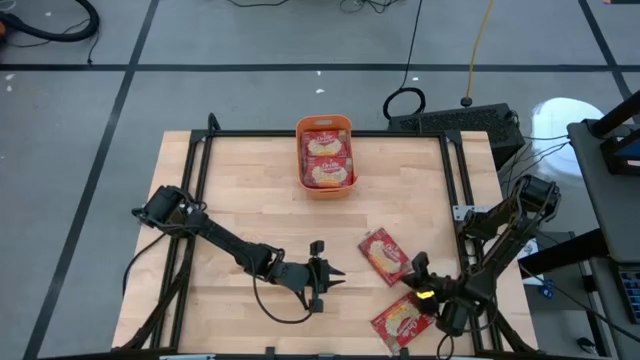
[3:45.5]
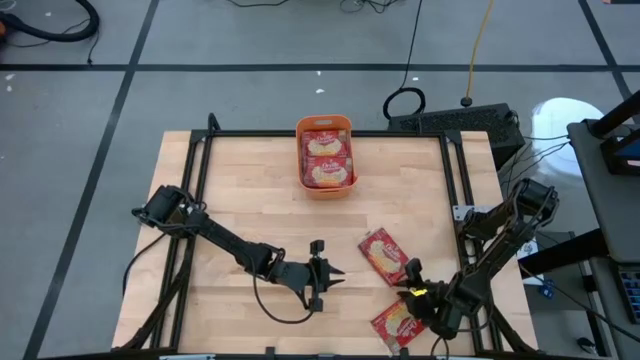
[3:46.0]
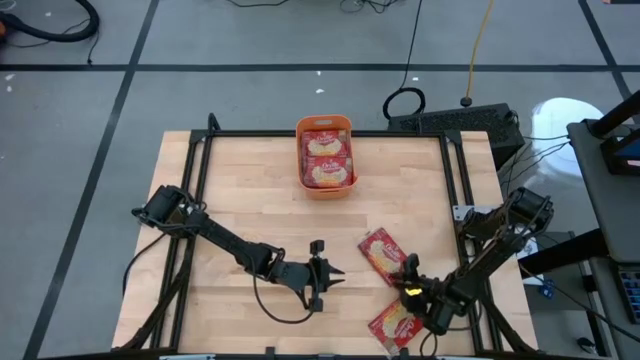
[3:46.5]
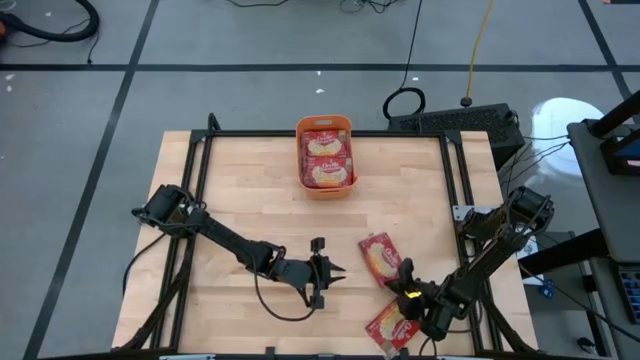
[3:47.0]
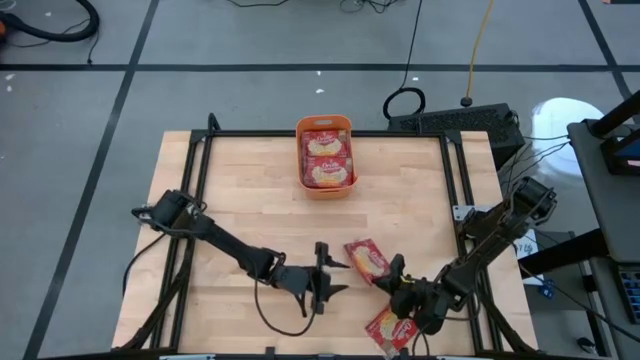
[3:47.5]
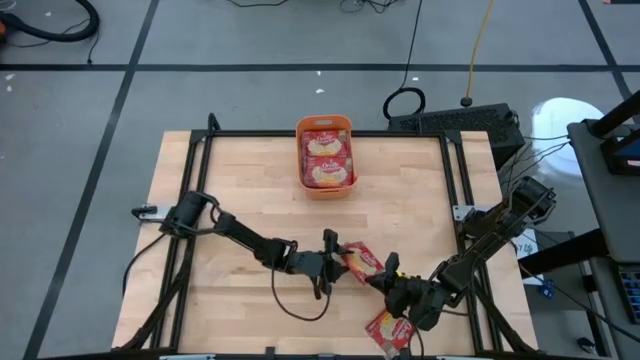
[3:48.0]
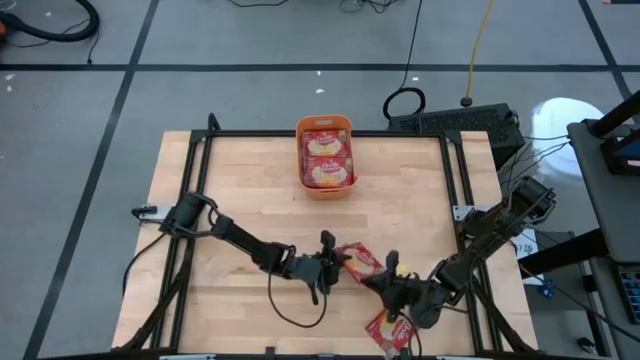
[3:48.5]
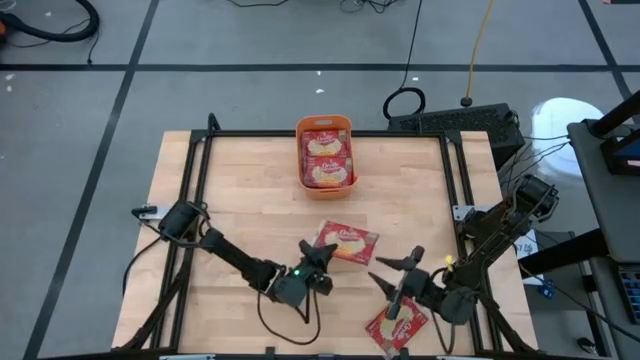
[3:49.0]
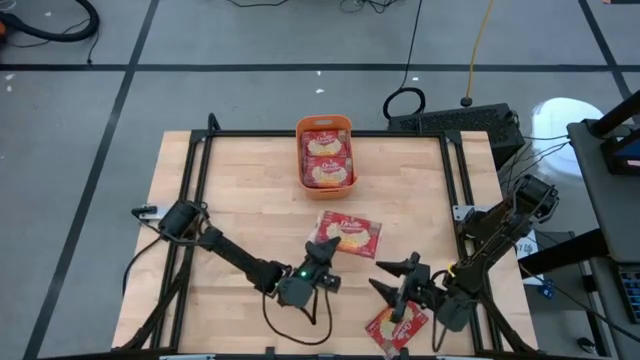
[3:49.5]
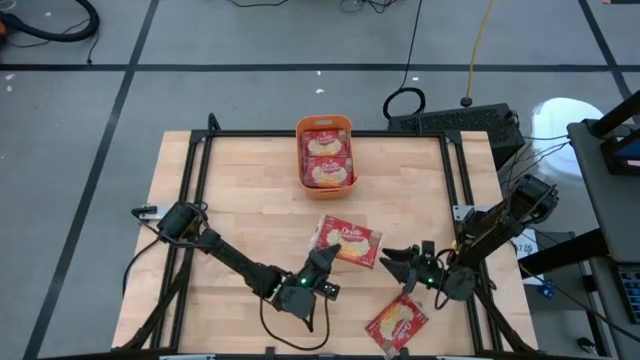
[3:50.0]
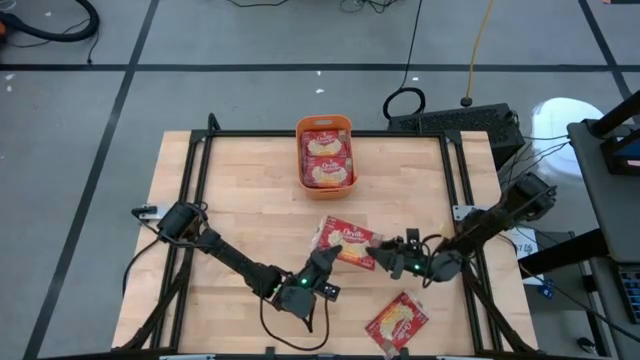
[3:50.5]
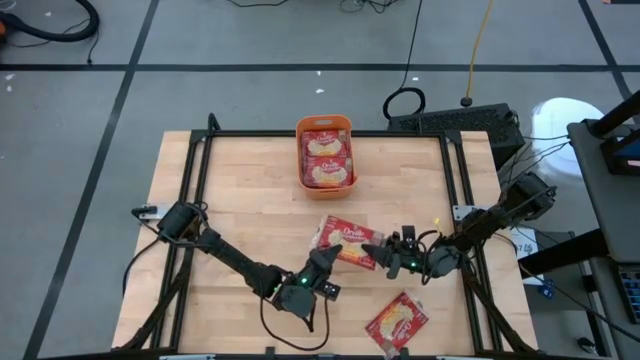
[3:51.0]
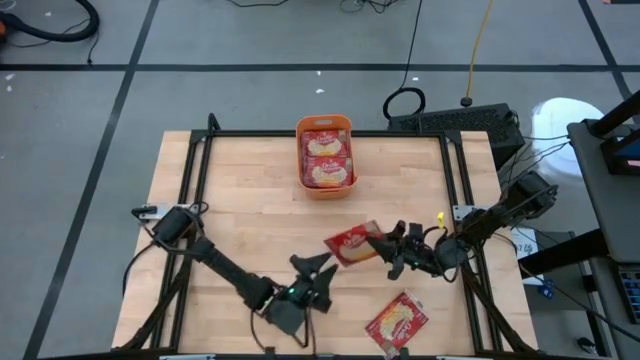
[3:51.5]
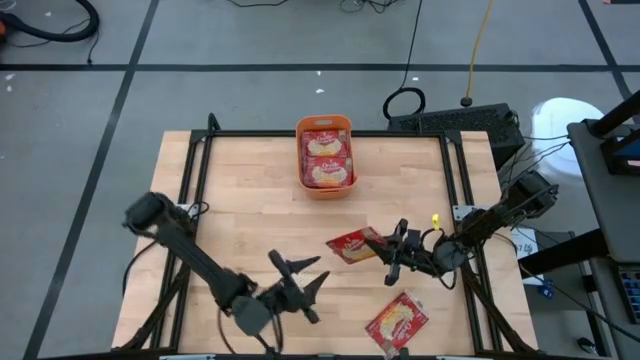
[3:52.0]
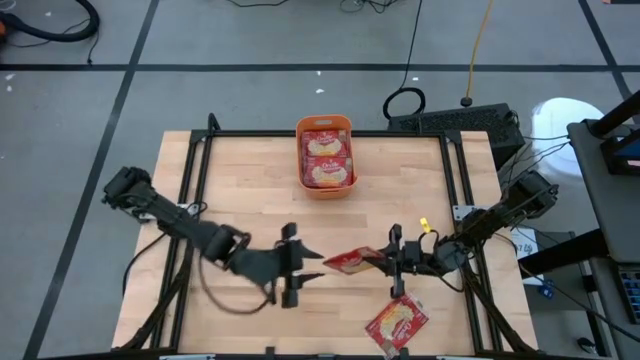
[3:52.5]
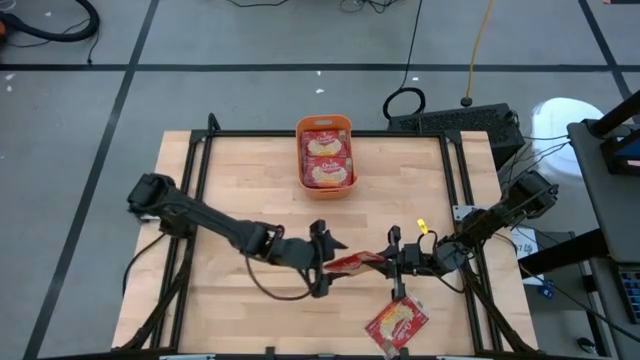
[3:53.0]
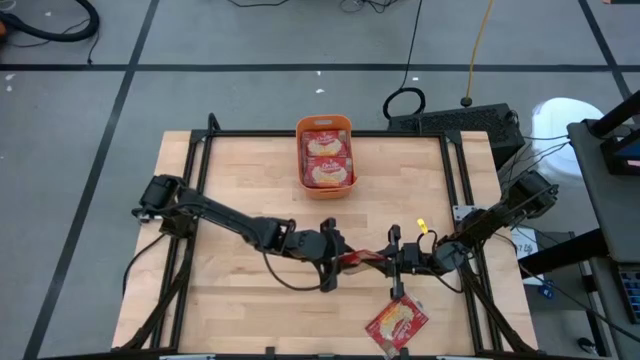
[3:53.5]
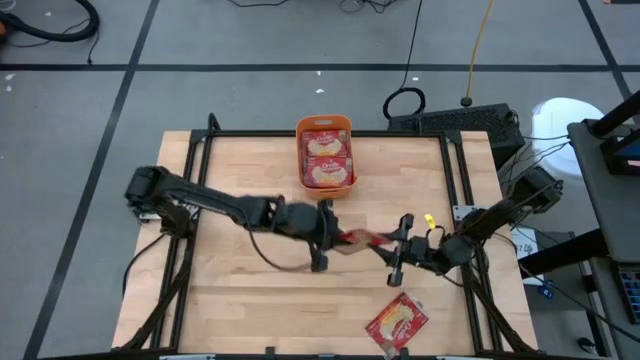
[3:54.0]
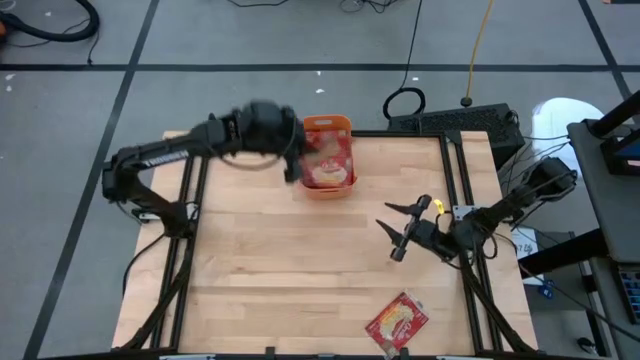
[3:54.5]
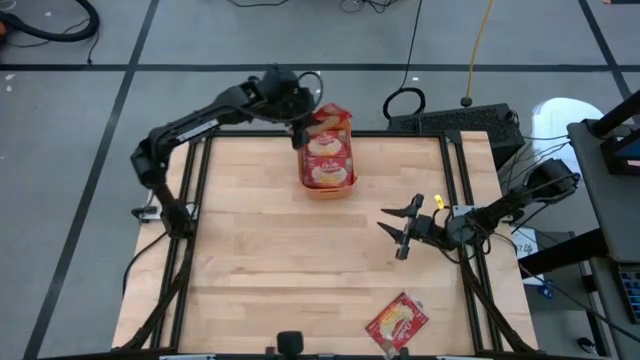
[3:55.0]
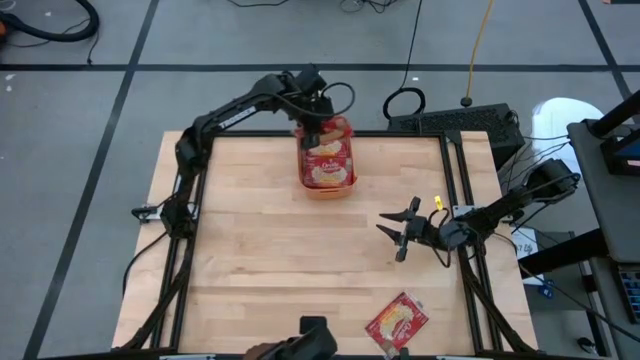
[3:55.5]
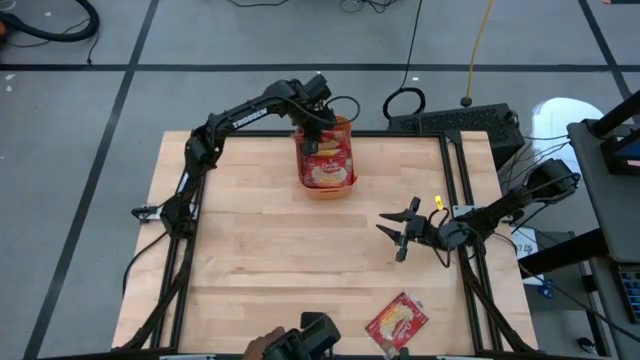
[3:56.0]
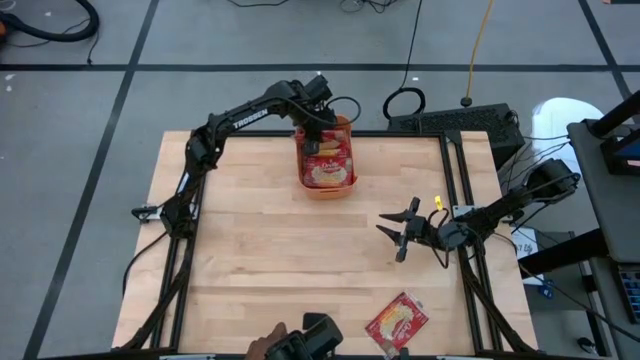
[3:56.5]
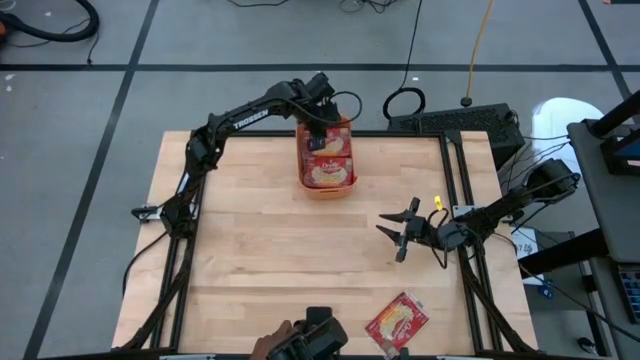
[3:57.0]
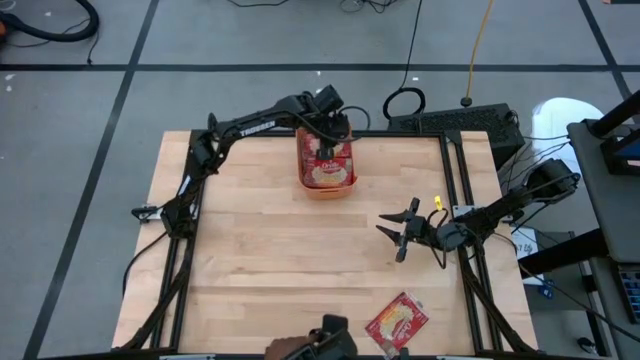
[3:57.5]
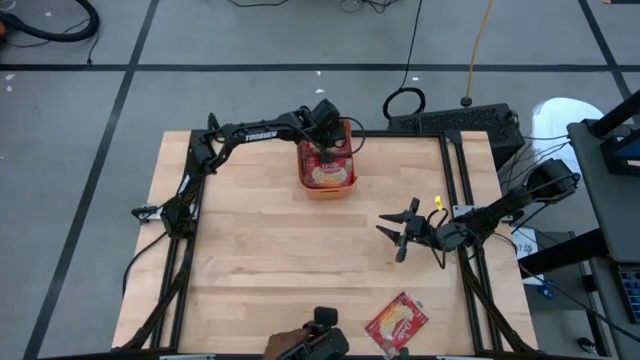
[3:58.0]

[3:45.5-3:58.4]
Task: Sort popcorn bags into baskets
Put the top red popcorn bag into the orange bin

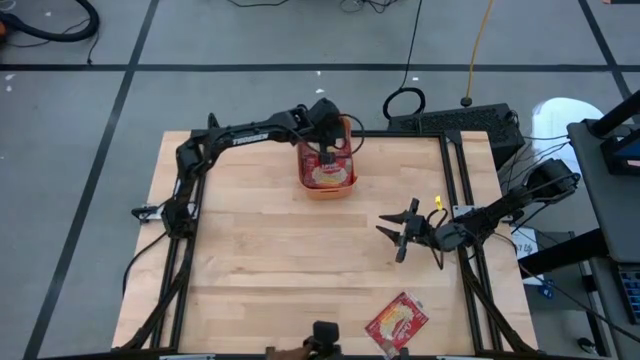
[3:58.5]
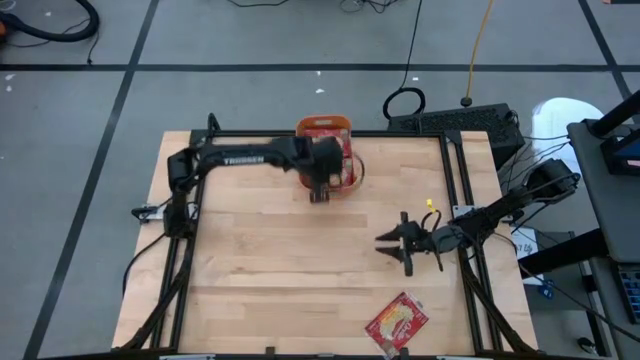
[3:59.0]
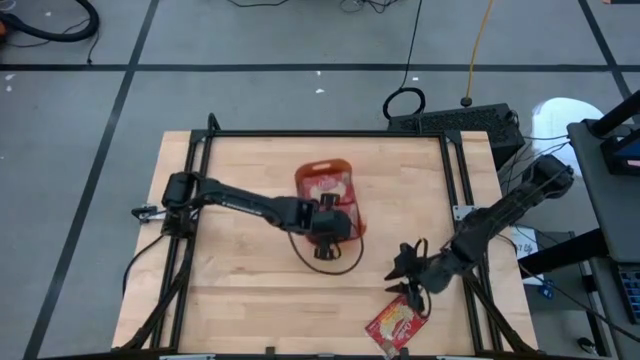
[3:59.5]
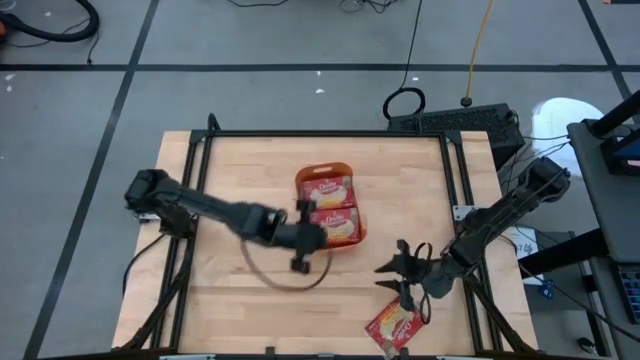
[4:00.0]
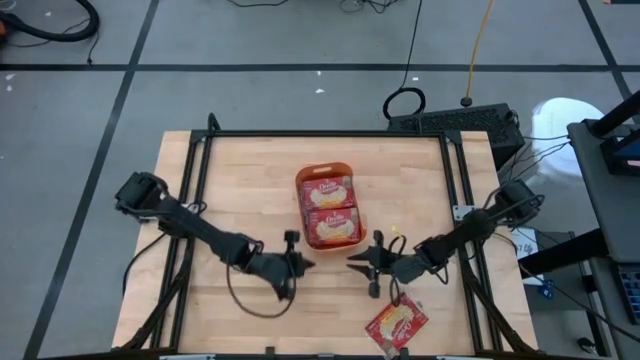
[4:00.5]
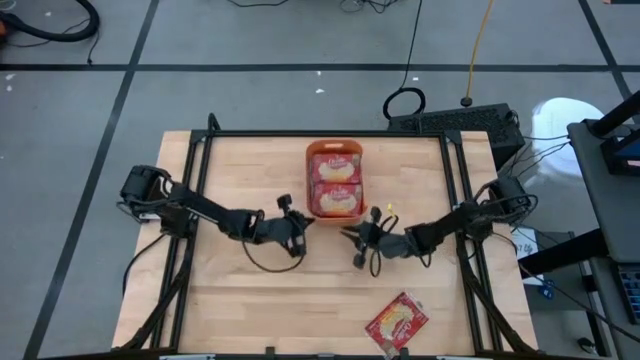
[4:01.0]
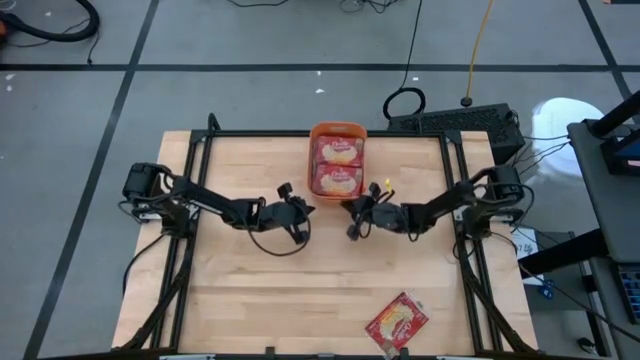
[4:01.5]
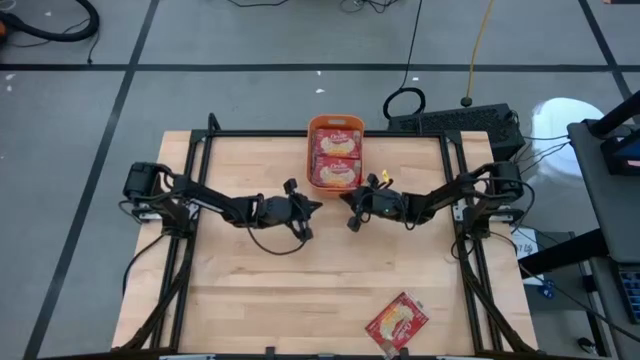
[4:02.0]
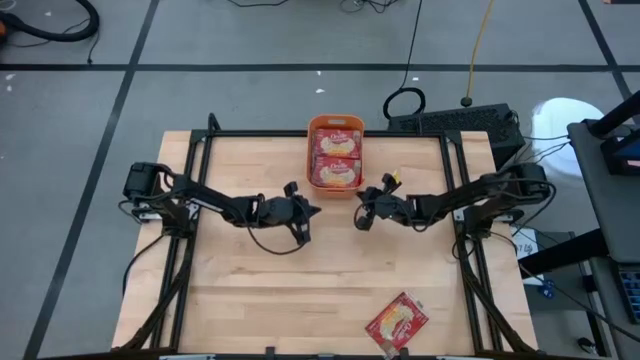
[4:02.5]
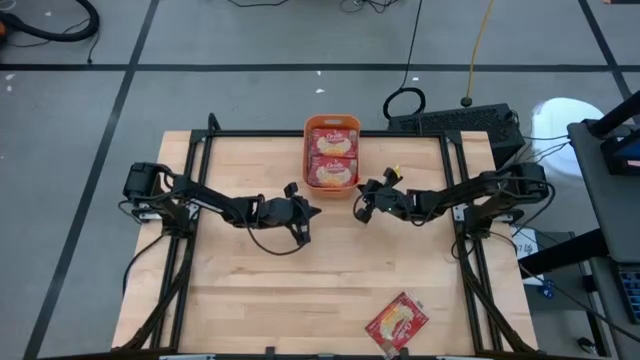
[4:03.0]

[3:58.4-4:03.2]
Adjust orange bin on the table

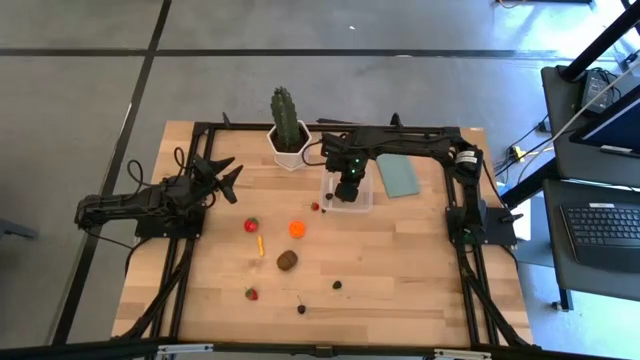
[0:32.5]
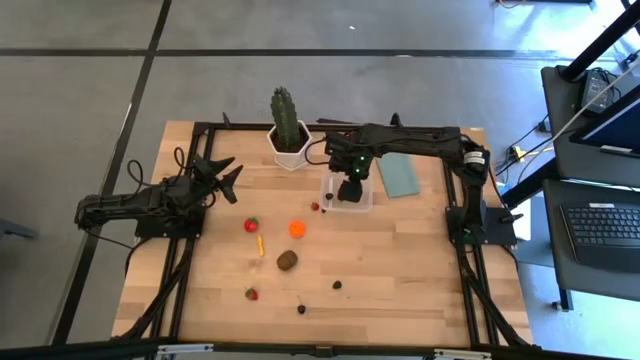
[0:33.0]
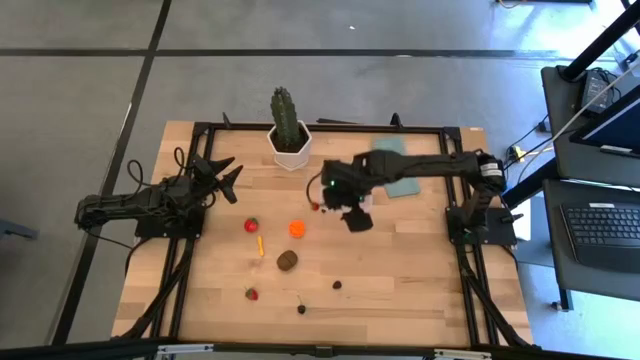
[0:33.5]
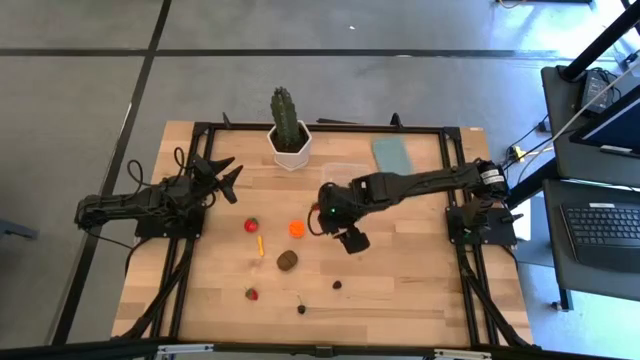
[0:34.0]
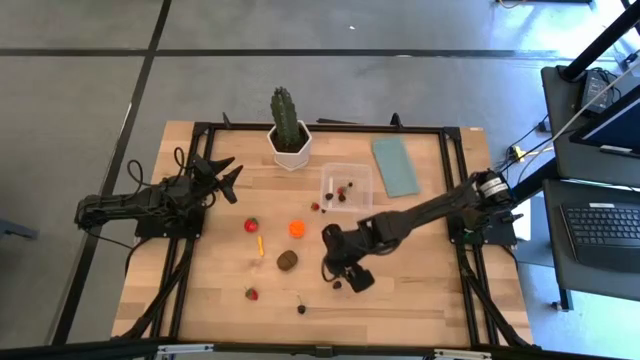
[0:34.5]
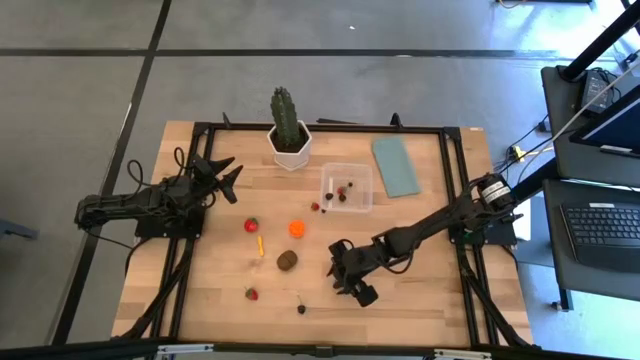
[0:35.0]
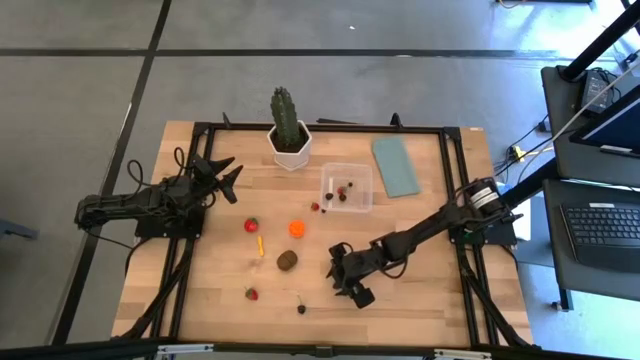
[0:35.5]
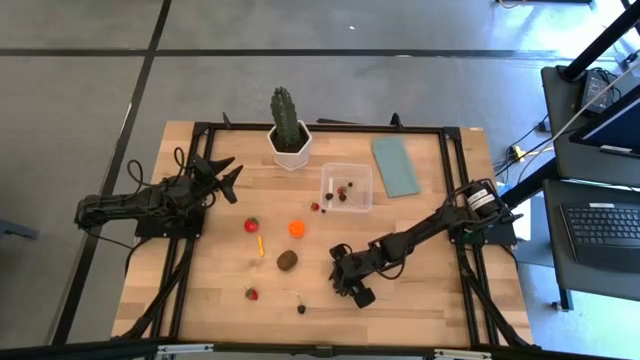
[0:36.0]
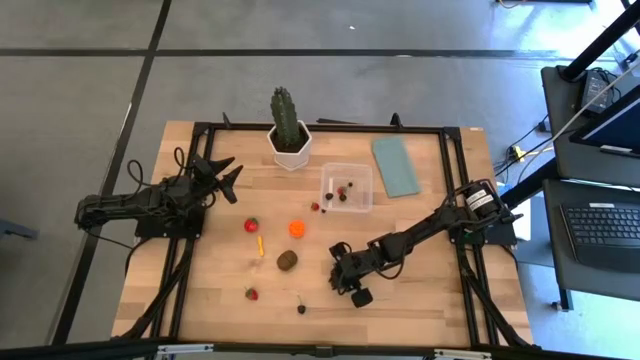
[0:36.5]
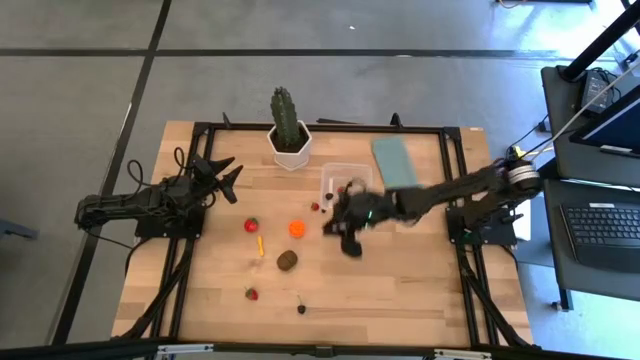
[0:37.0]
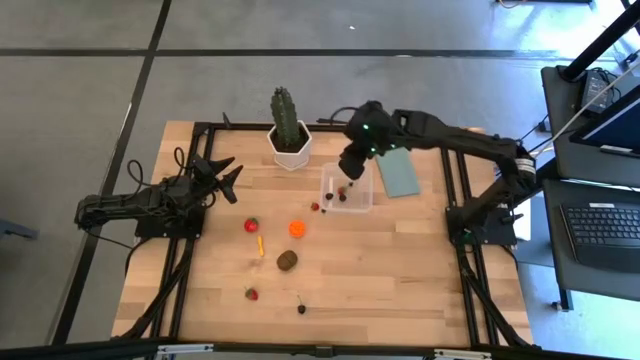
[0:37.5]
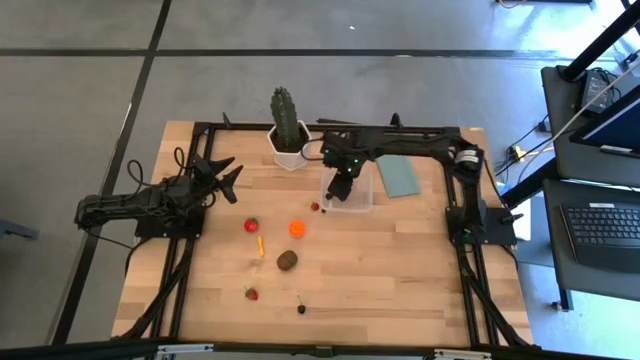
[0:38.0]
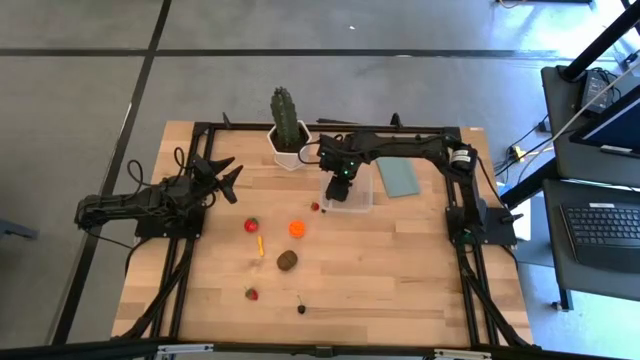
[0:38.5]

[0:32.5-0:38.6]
Task: Pick and placing Produce into tupperware
Put the raspberry into the transparent bin
